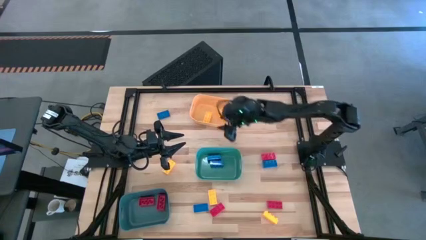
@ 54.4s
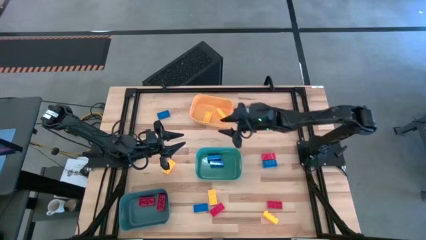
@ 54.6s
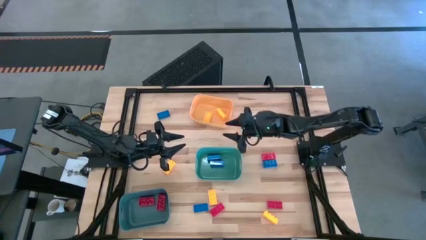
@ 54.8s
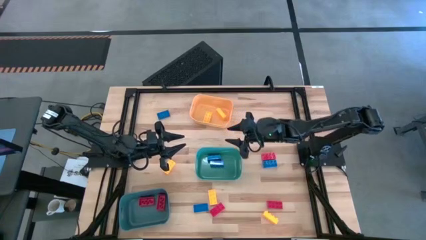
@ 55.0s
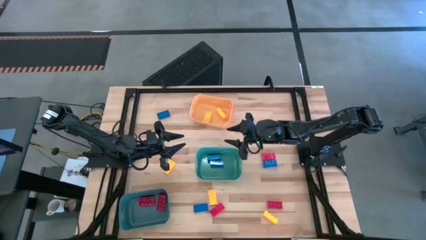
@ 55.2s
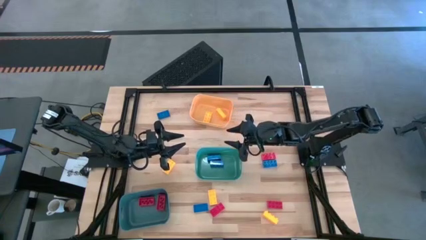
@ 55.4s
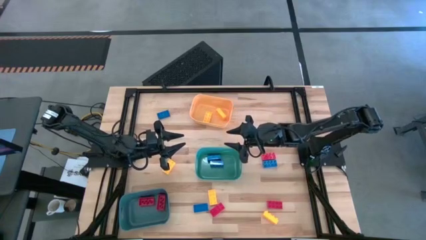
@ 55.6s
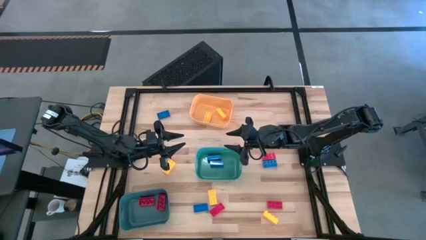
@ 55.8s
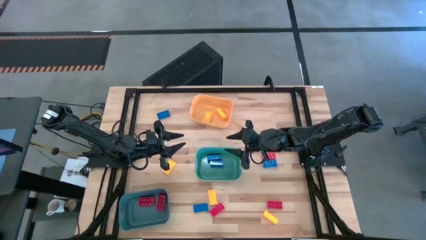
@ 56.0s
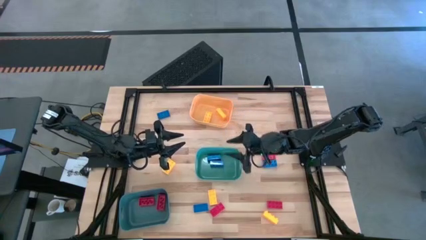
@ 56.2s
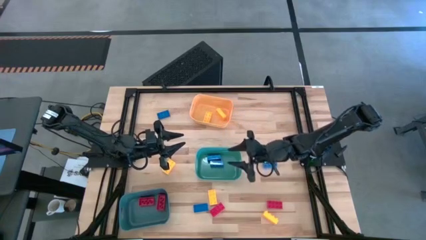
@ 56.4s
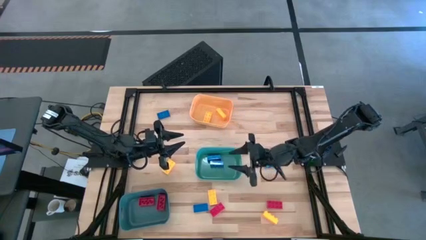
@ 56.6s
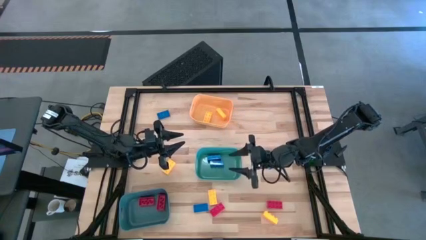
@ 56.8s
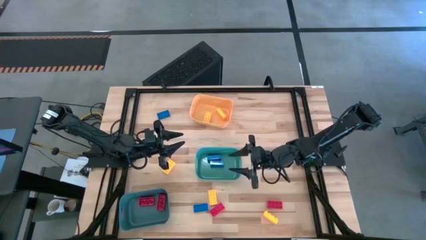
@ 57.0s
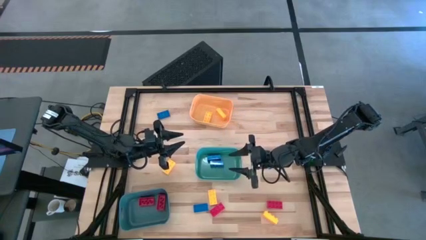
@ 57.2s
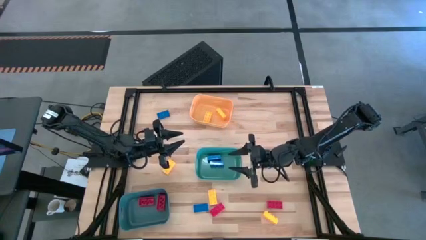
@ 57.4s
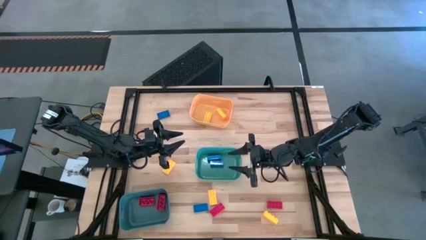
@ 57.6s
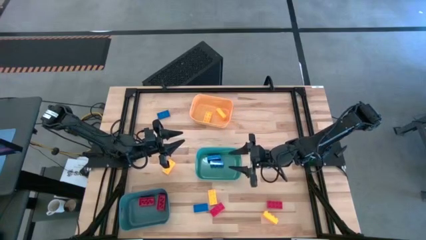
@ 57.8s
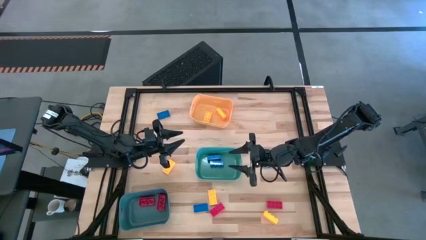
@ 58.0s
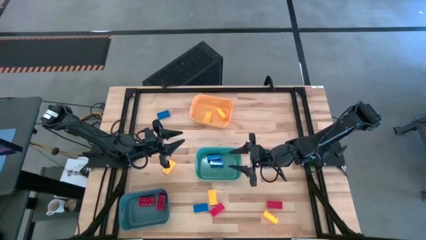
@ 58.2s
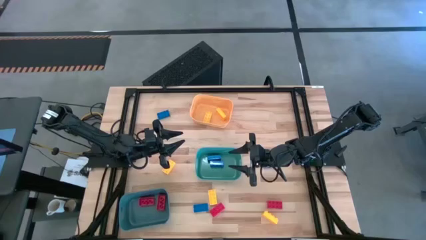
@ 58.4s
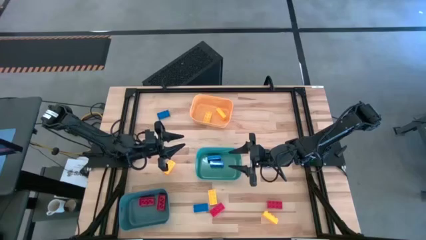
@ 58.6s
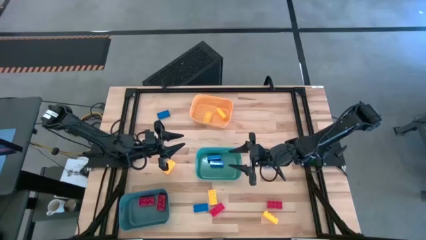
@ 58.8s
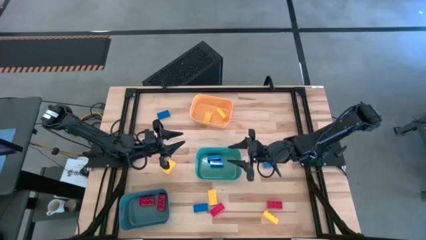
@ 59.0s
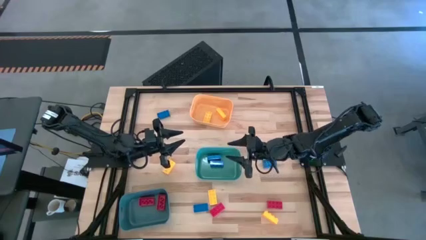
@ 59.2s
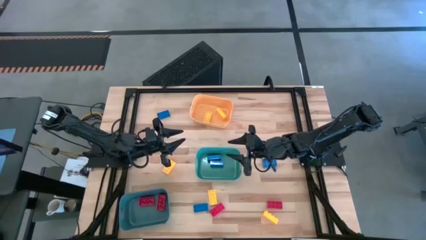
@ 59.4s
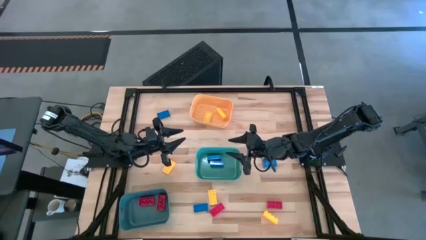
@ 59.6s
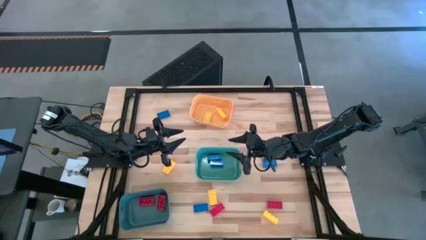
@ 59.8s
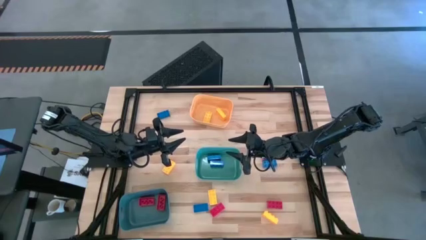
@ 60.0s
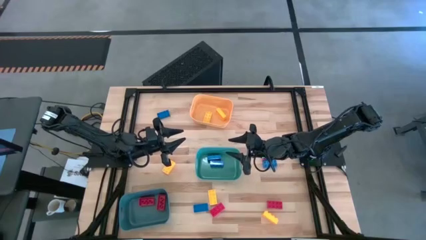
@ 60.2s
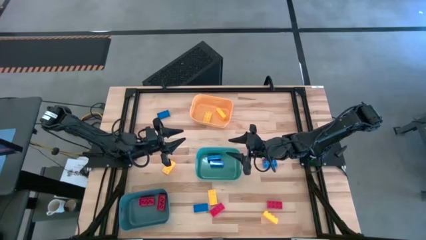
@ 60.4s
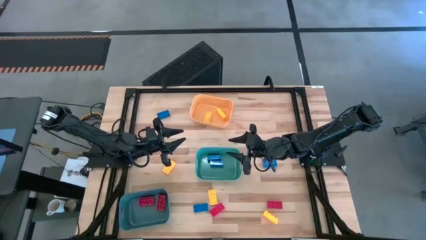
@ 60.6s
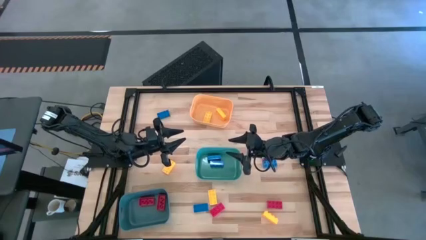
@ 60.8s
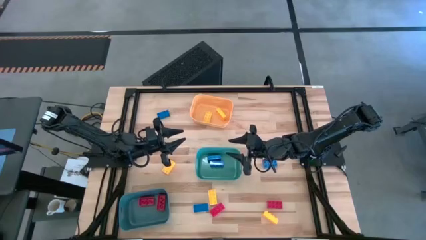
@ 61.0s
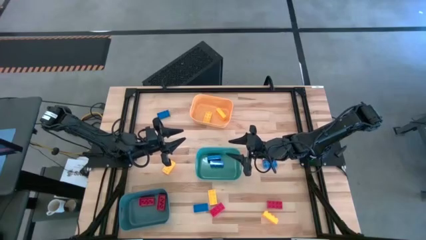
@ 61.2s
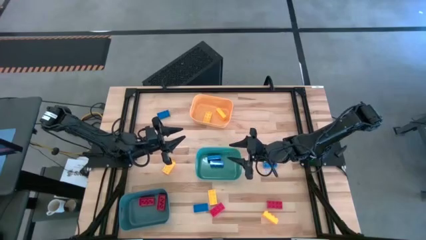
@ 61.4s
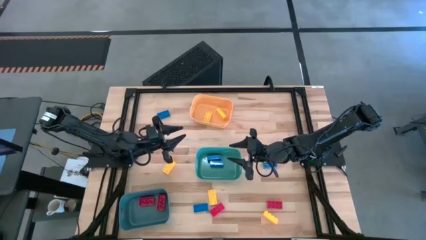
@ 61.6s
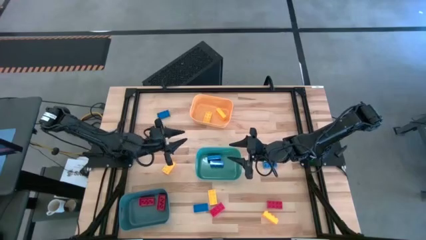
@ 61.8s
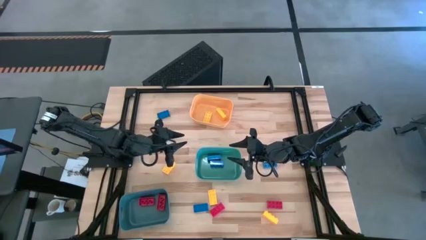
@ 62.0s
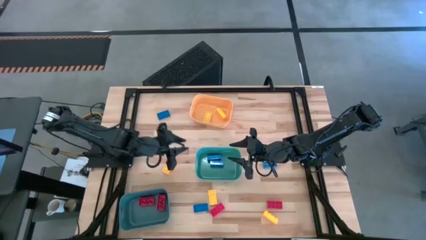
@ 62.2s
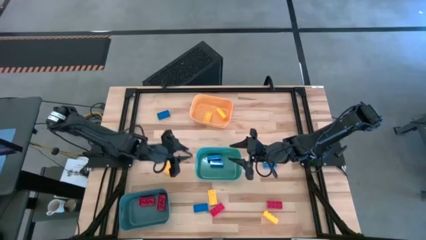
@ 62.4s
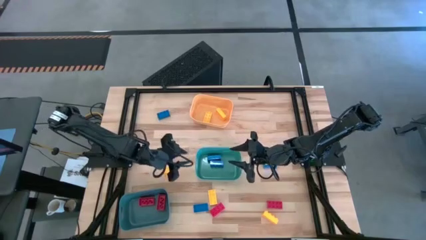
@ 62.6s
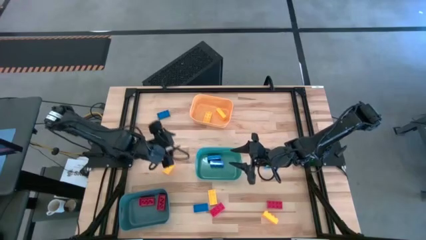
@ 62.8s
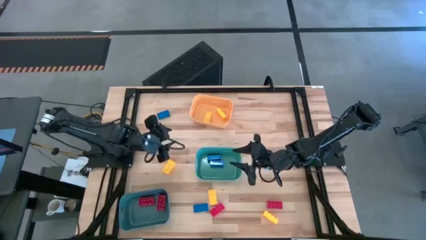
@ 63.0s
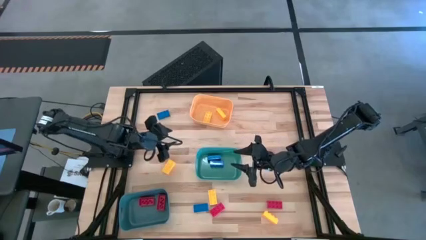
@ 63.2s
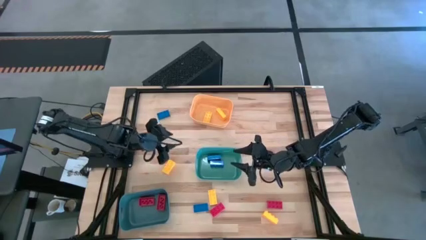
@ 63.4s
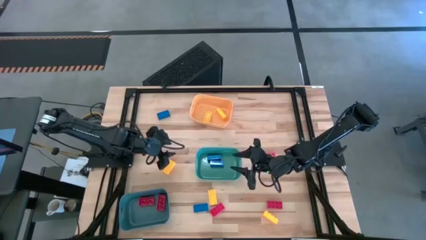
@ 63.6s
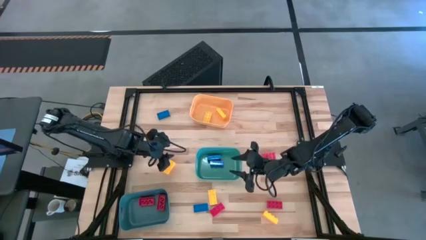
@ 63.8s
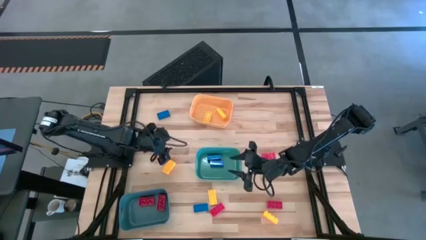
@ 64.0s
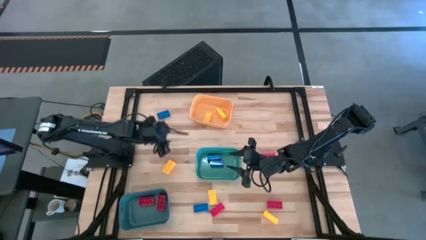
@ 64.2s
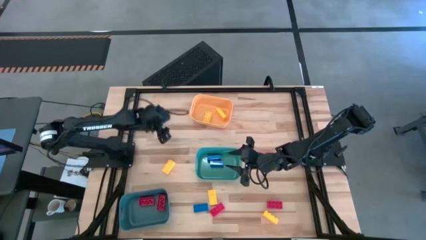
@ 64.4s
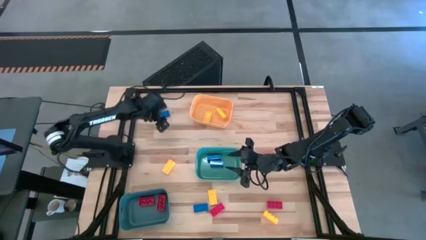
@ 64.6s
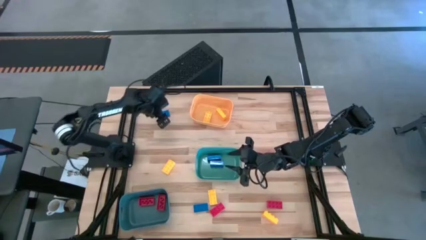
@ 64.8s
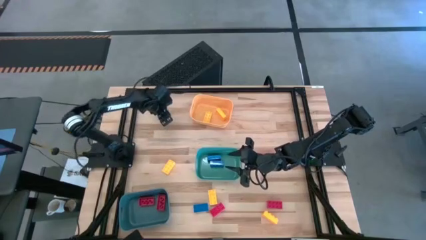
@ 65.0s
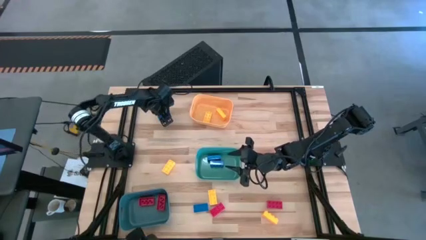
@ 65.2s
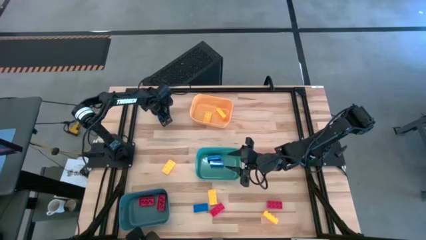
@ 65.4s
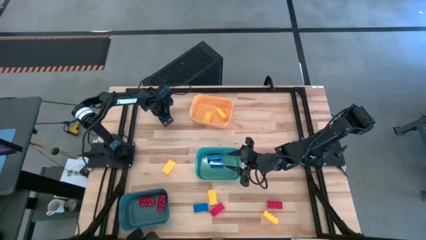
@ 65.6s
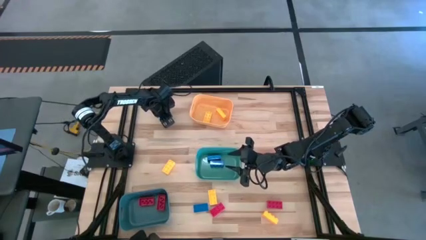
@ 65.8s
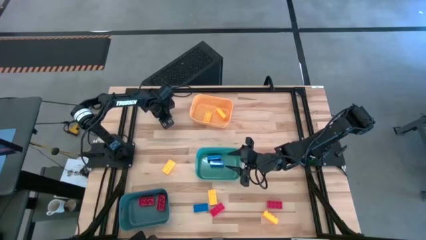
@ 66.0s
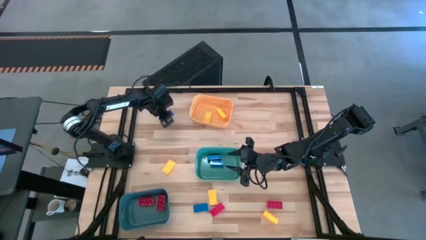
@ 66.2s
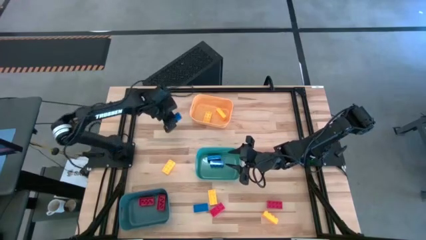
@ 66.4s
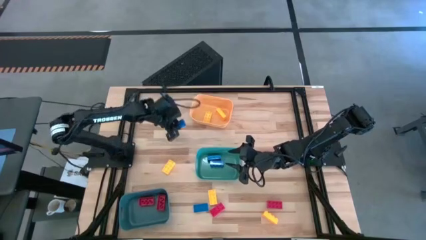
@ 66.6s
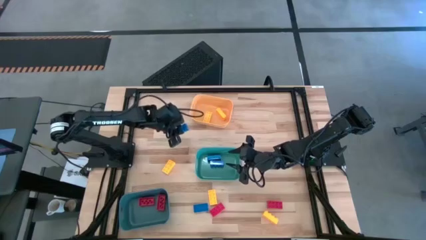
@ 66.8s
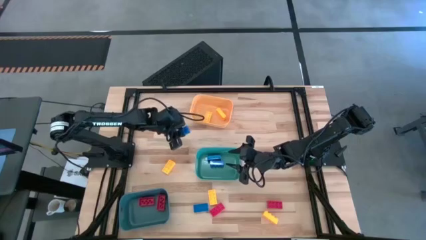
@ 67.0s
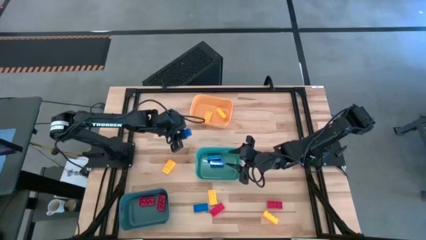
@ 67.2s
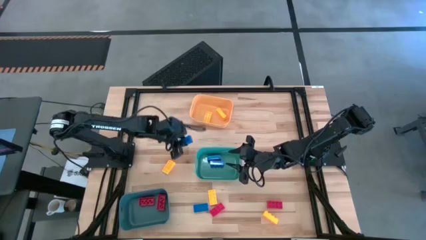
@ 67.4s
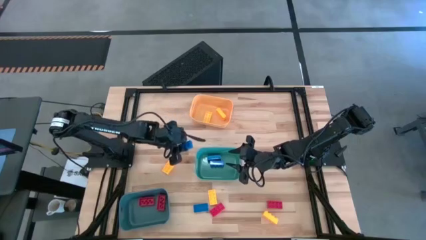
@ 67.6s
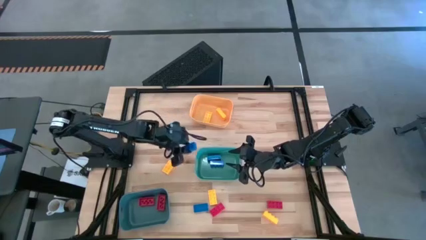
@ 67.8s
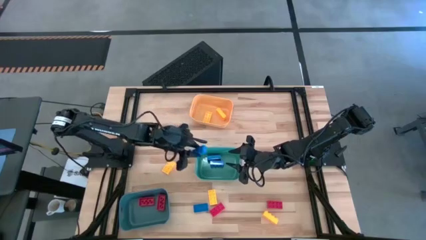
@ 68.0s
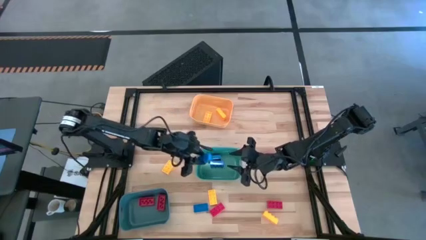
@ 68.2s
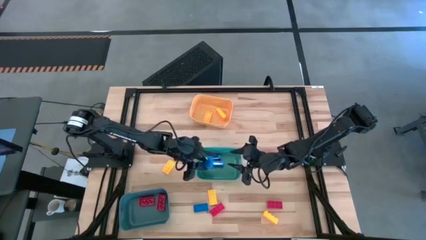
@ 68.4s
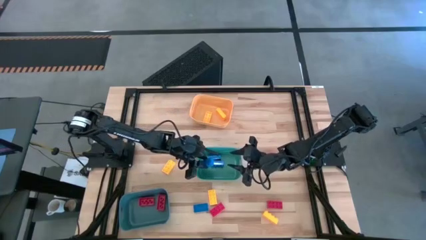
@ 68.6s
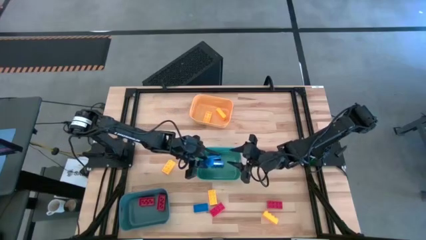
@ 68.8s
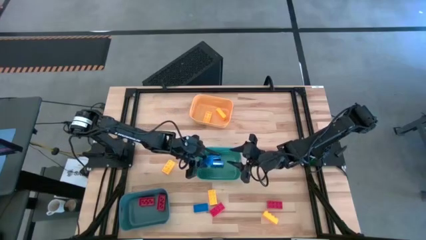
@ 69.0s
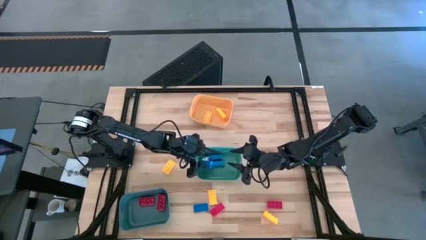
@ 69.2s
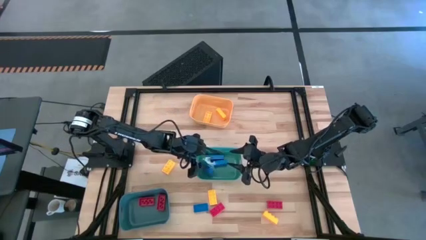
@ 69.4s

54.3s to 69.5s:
Task: Sort & place blocks by color
Put the blue game piece into the green bin
